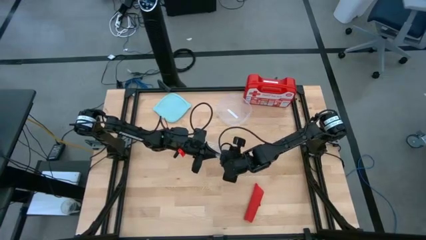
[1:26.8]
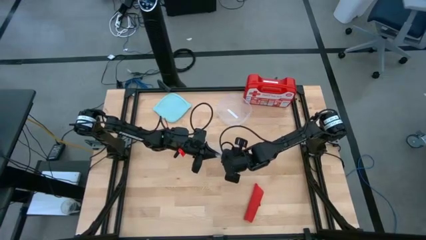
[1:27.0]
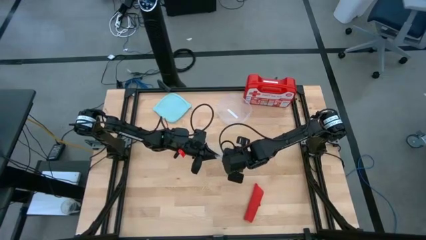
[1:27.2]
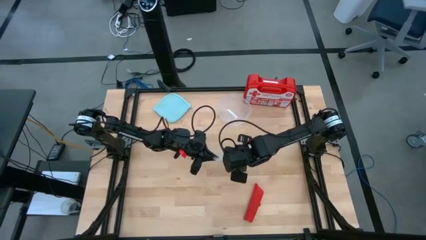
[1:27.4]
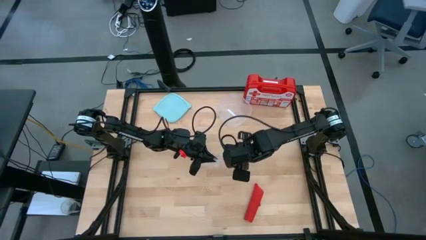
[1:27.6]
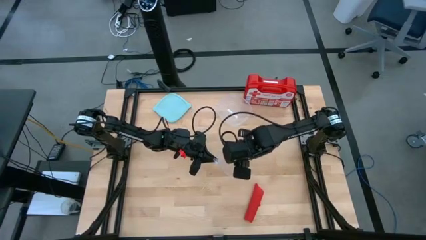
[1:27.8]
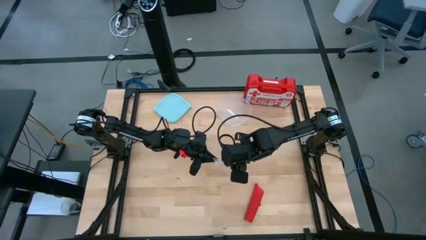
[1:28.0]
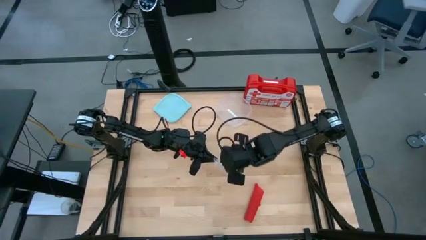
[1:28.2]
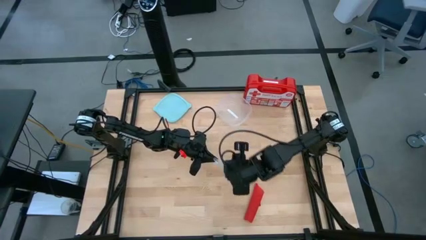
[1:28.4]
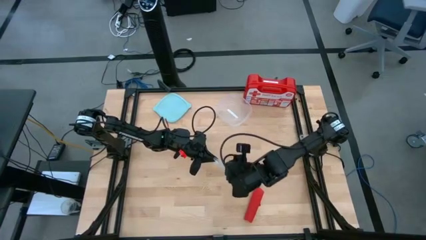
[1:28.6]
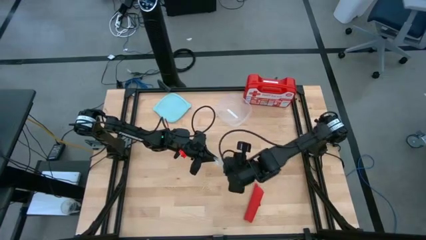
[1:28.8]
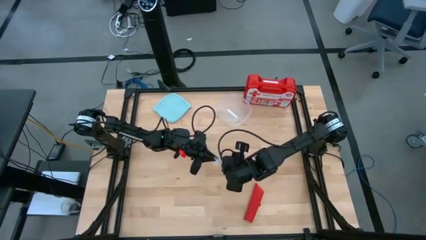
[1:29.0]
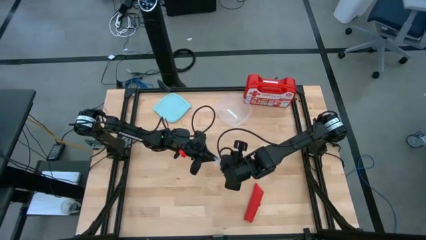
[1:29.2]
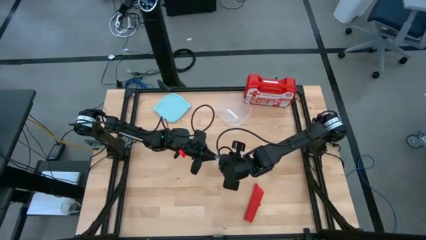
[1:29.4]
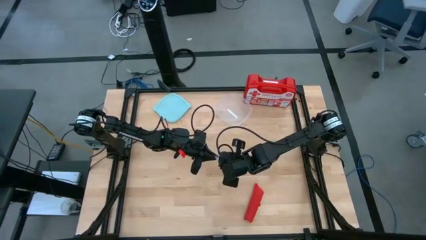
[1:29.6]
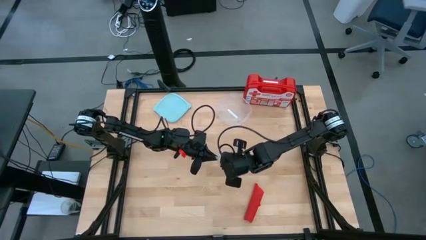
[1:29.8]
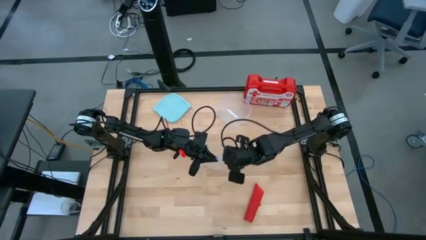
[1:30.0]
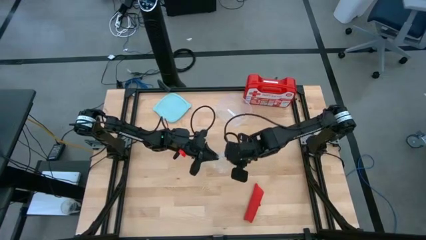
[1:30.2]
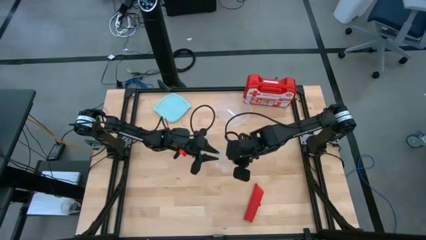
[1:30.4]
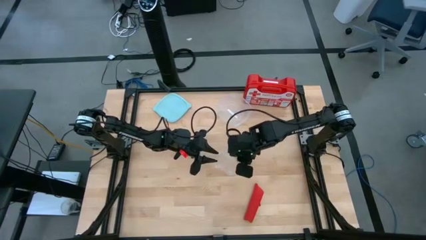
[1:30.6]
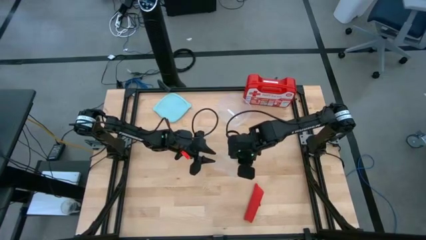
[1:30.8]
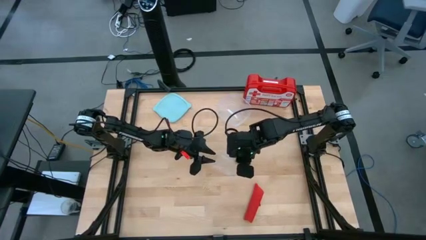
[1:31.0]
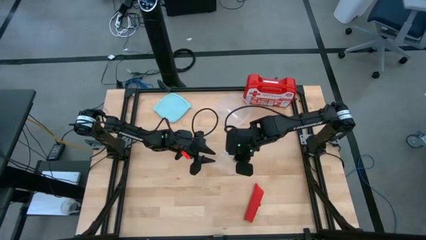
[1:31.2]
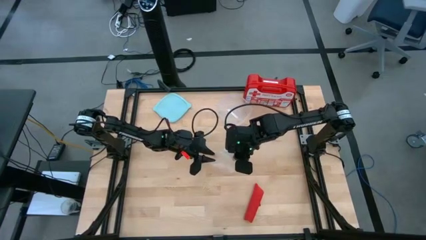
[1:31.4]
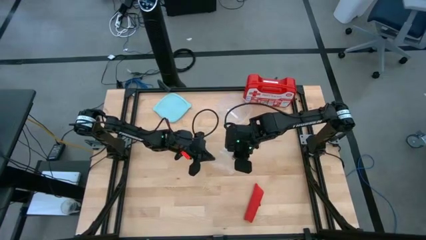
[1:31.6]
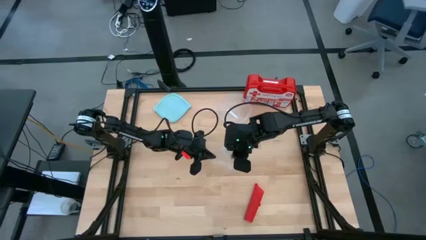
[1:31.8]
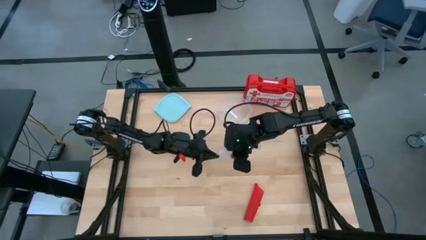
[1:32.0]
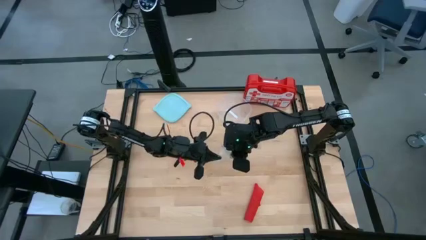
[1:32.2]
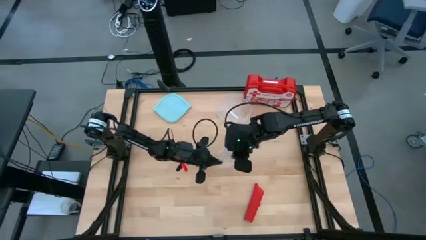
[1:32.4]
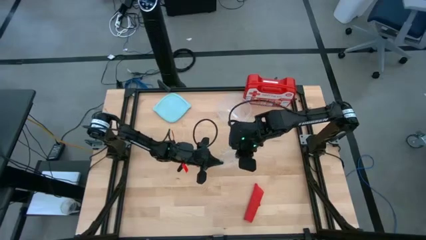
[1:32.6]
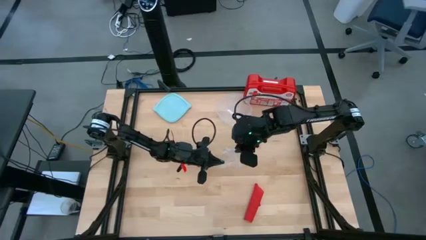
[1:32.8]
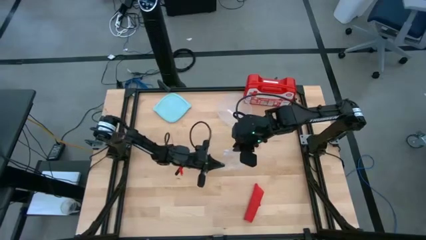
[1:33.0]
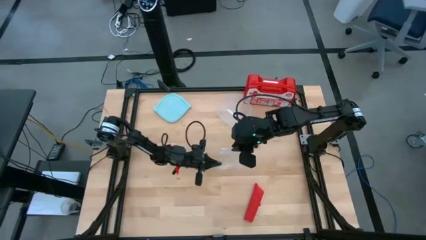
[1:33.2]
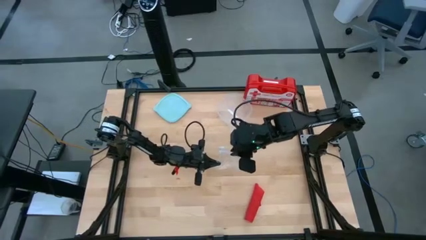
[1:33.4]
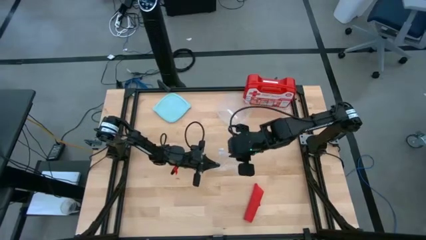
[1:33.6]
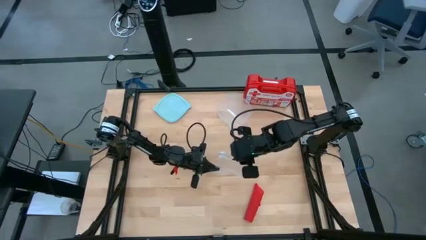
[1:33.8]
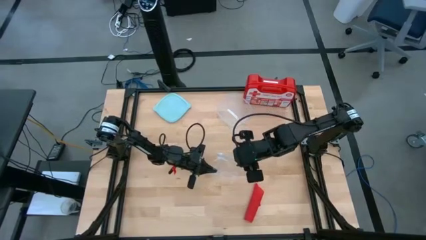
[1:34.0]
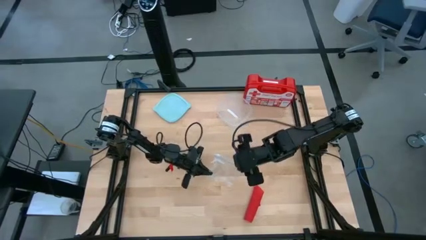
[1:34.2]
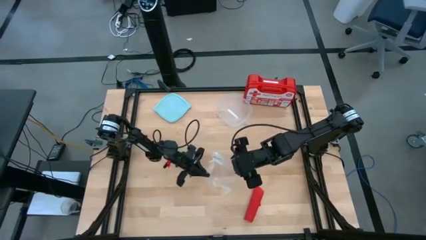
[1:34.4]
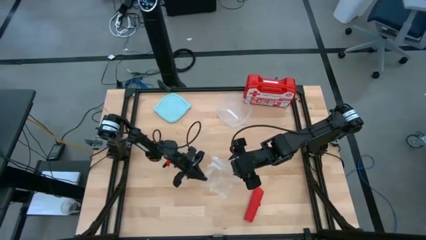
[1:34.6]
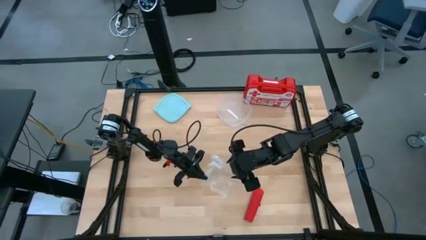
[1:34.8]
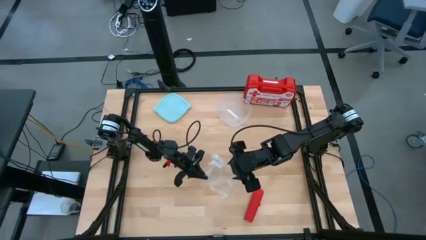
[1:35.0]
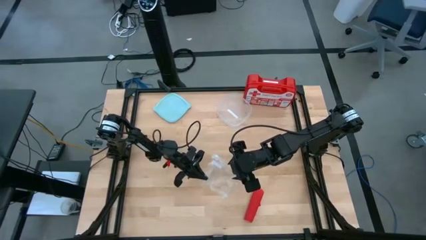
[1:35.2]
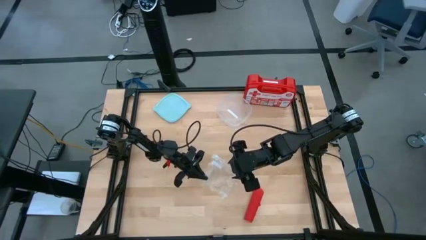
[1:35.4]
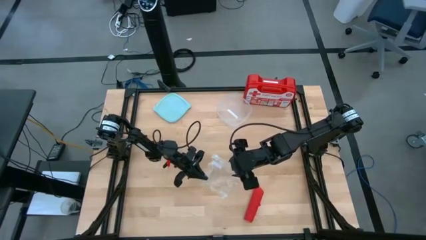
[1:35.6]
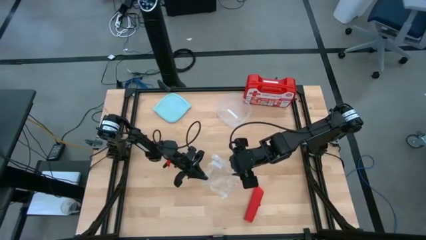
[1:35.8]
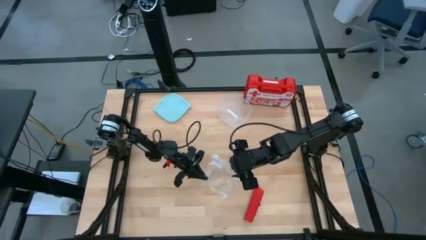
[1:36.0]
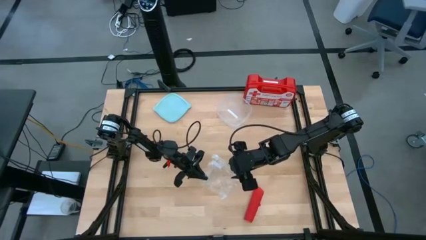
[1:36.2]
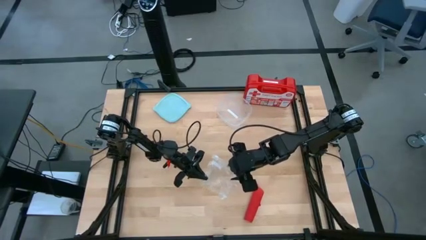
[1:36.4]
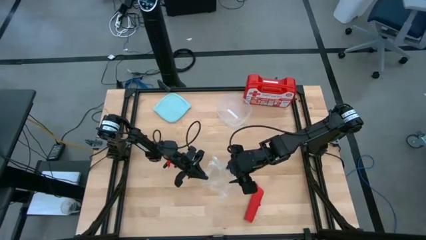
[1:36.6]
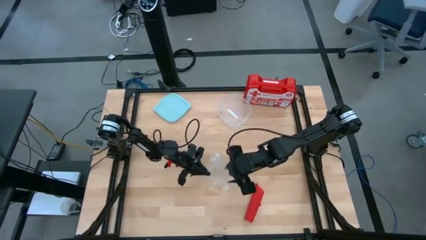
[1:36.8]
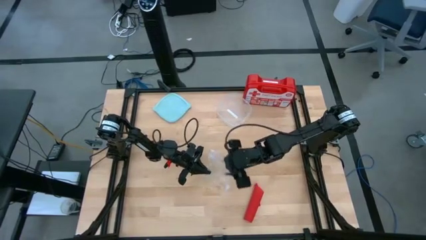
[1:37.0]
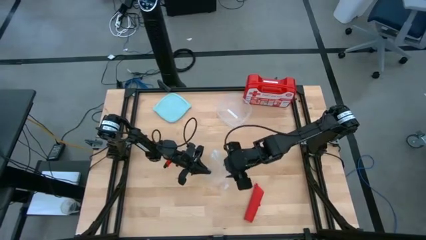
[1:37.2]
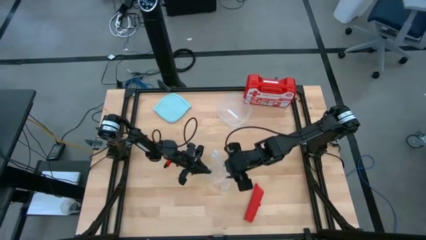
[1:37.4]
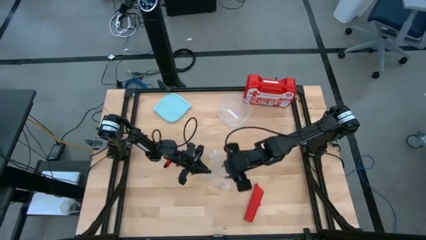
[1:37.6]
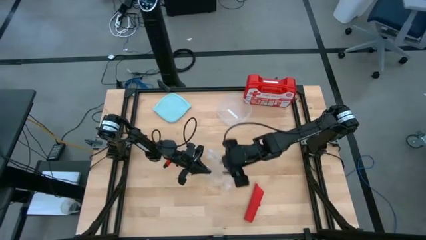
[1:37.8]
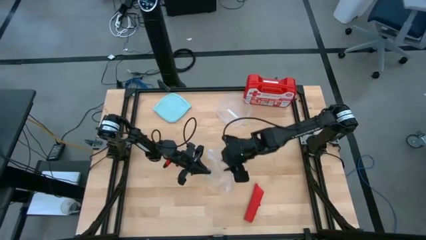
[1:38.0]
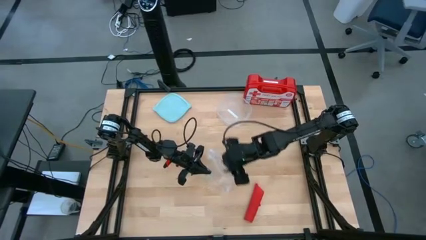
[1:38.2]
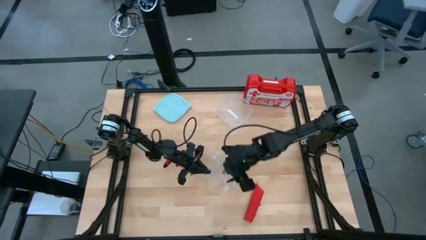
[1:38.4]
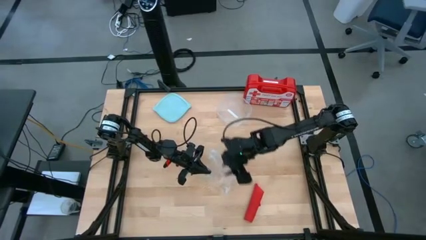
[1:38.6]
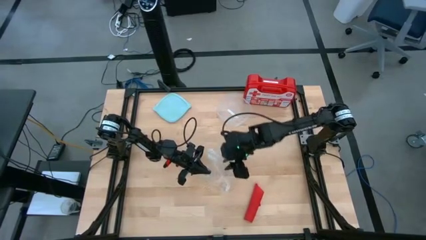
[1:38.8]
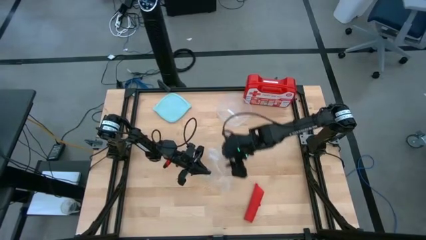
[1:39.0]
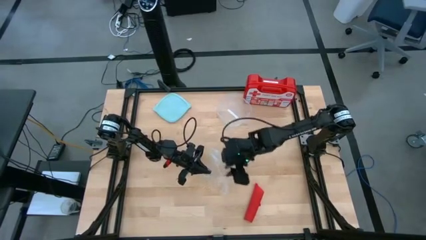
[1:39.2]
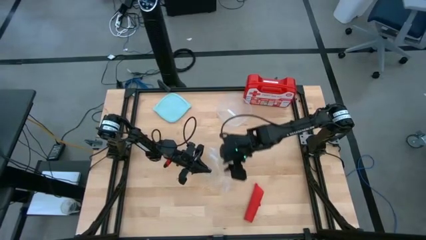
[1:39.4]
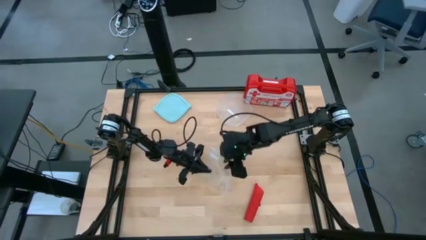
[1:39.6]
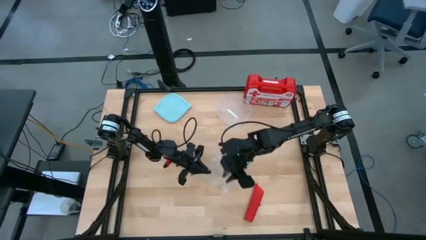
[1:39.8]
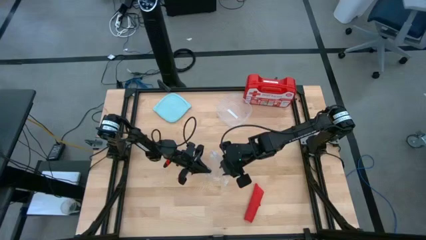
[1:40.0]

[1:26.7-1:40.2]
Task: Roll bandage
Open the transparent zip bag
